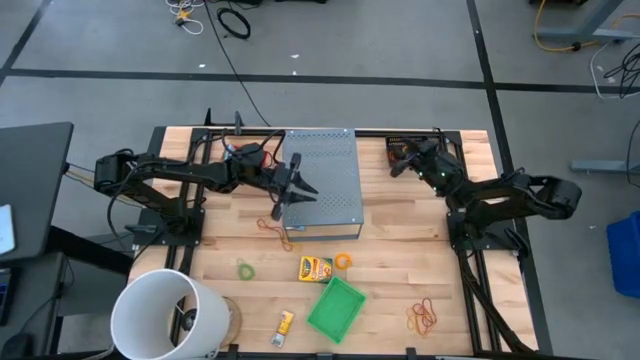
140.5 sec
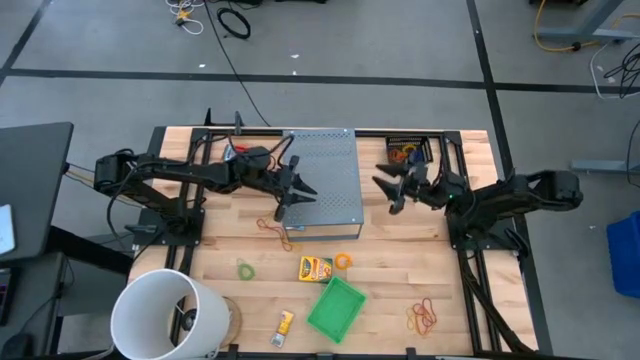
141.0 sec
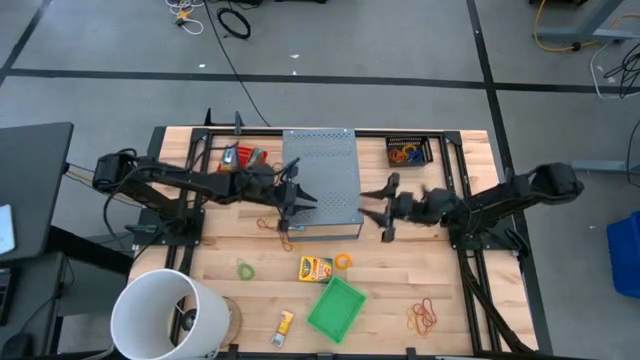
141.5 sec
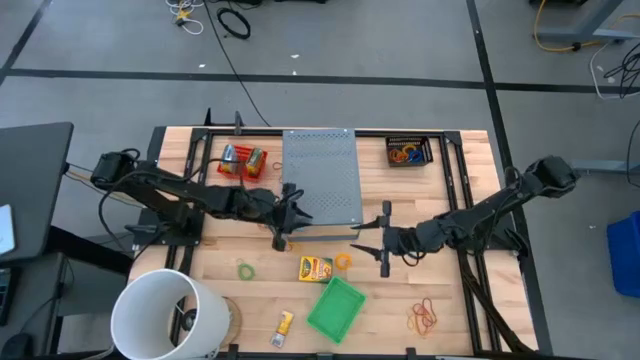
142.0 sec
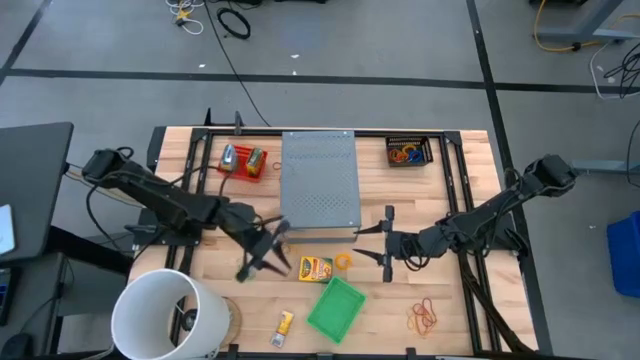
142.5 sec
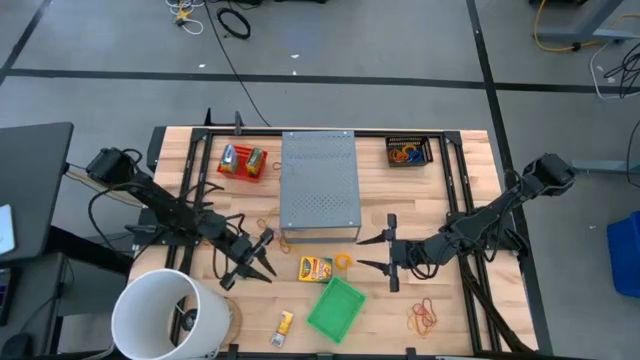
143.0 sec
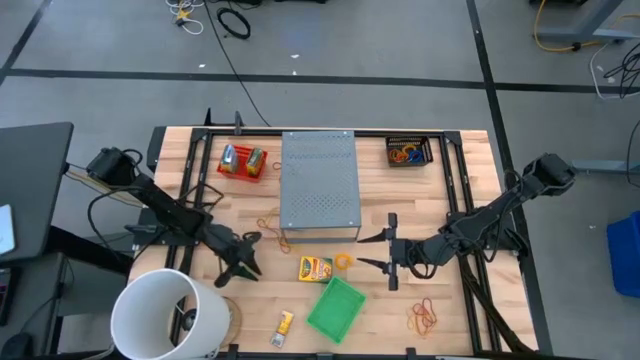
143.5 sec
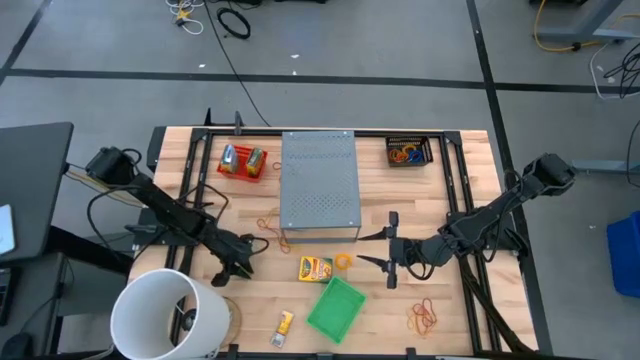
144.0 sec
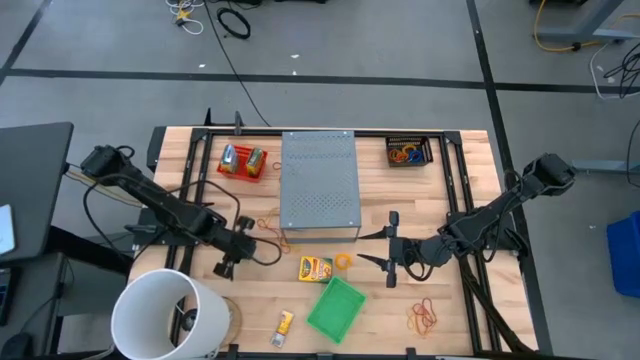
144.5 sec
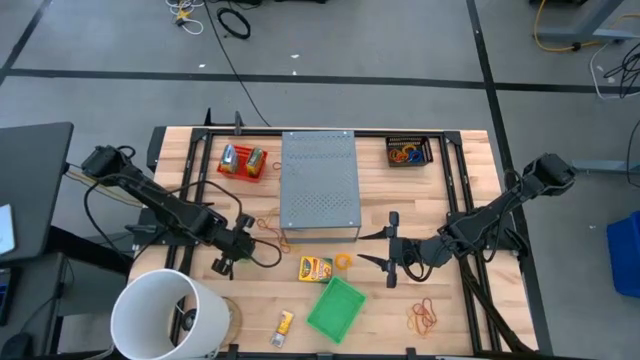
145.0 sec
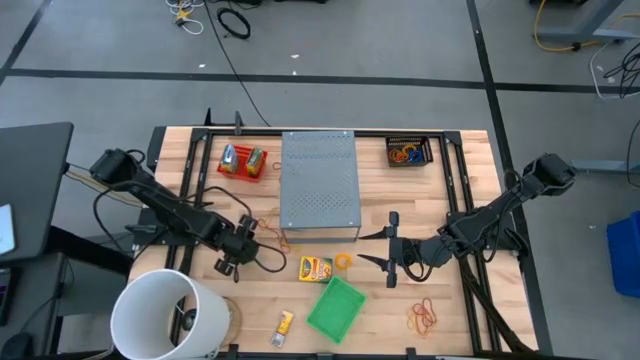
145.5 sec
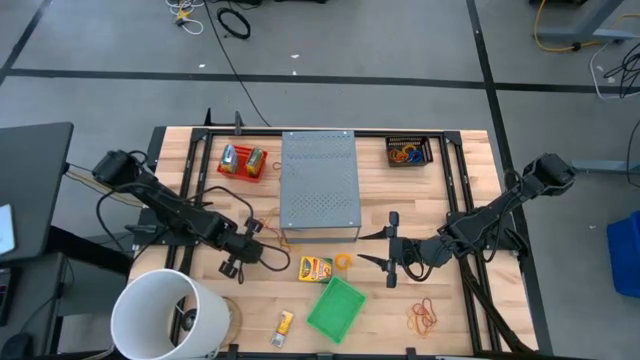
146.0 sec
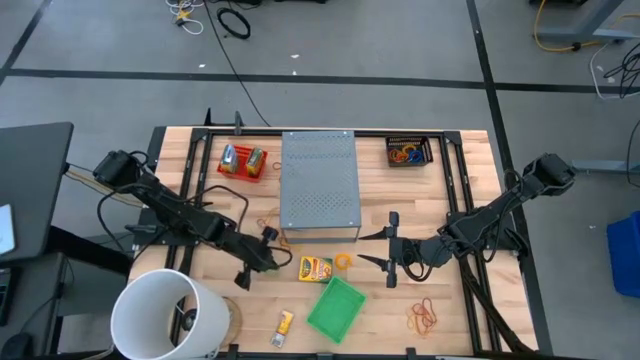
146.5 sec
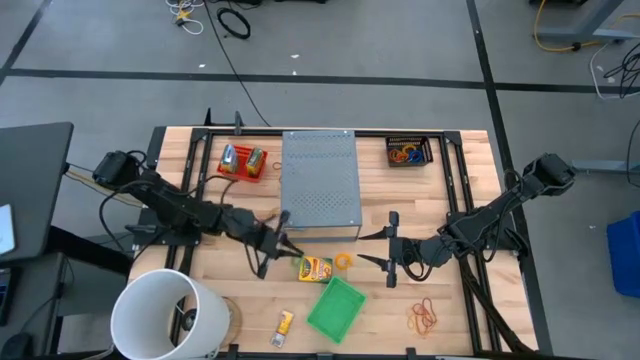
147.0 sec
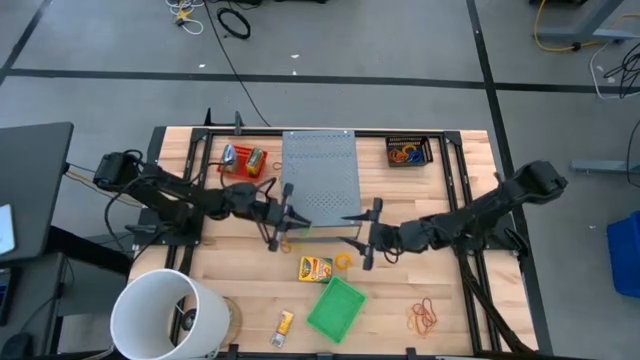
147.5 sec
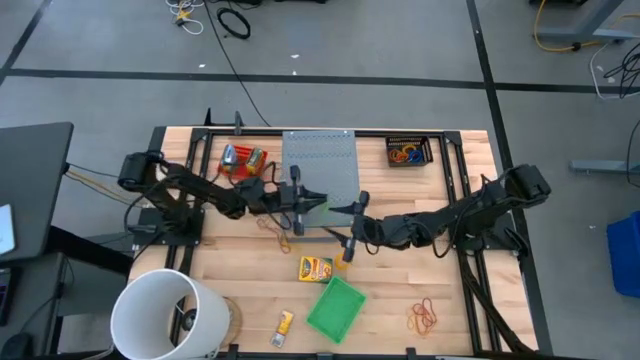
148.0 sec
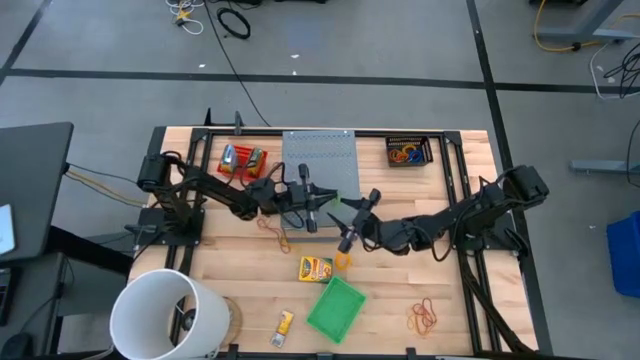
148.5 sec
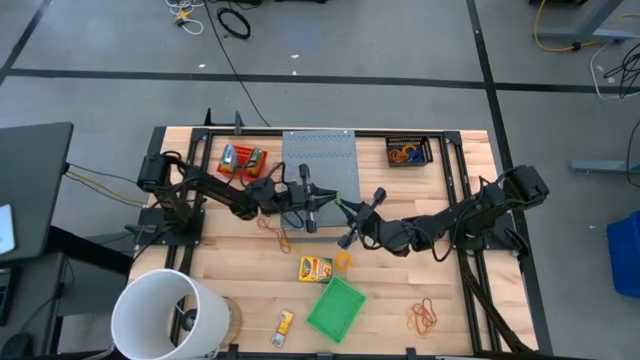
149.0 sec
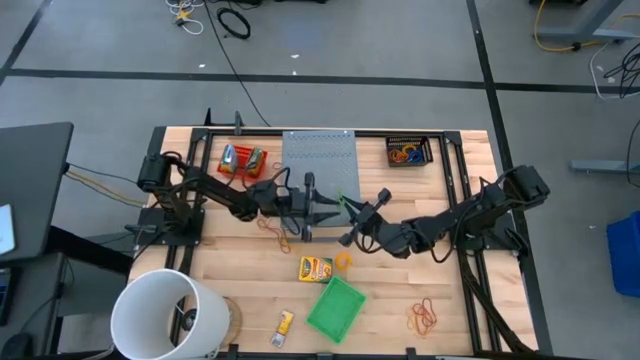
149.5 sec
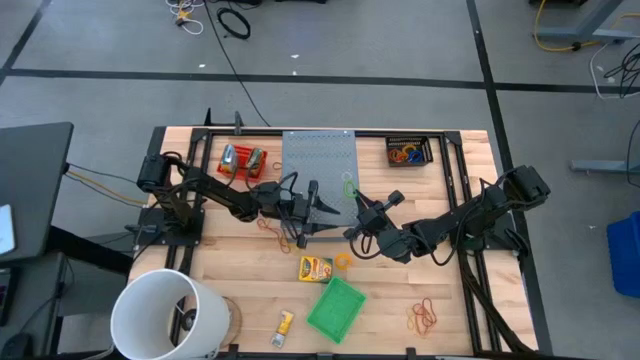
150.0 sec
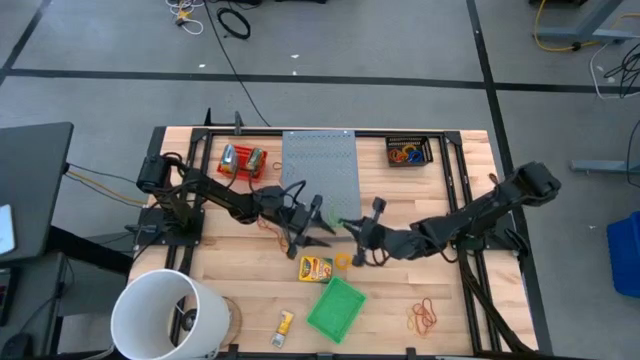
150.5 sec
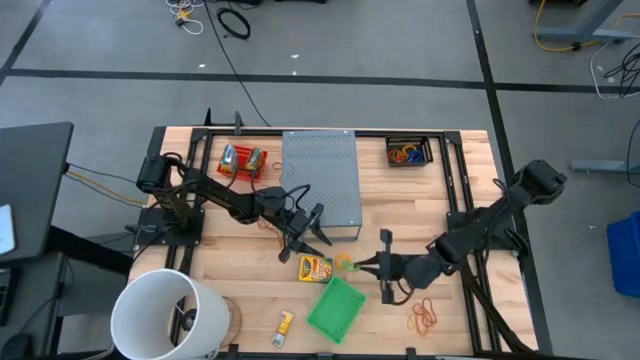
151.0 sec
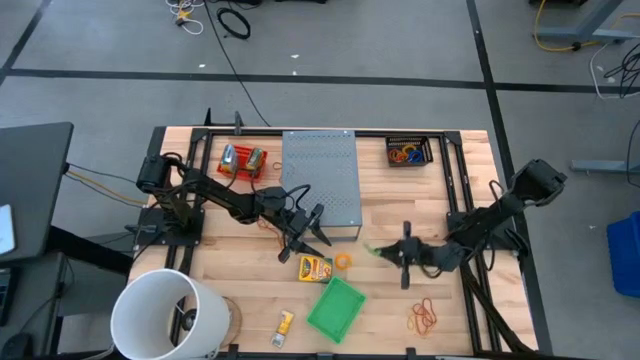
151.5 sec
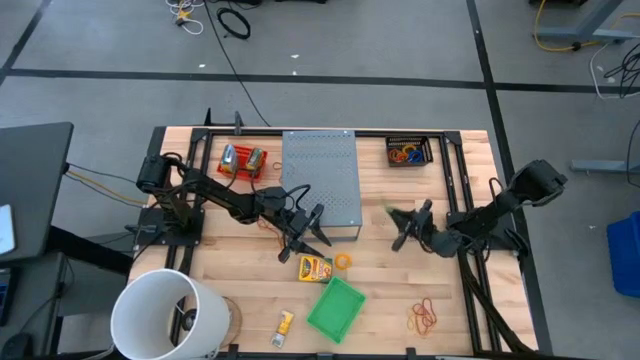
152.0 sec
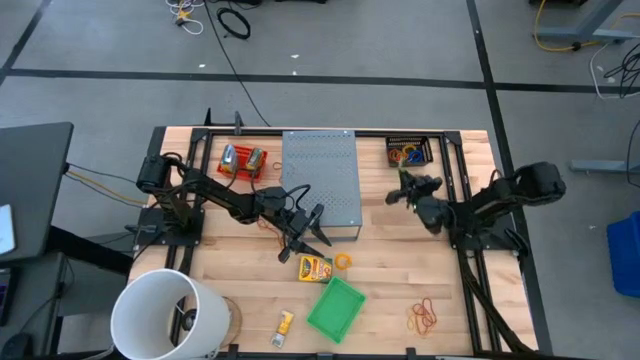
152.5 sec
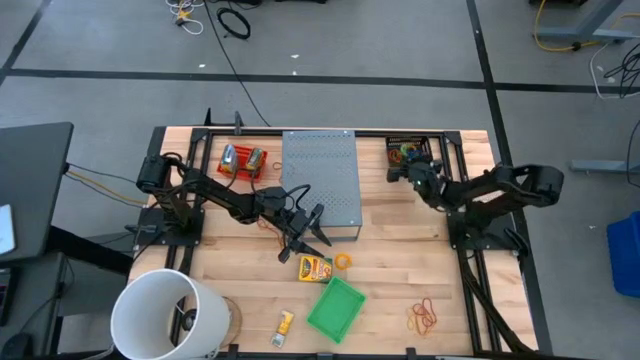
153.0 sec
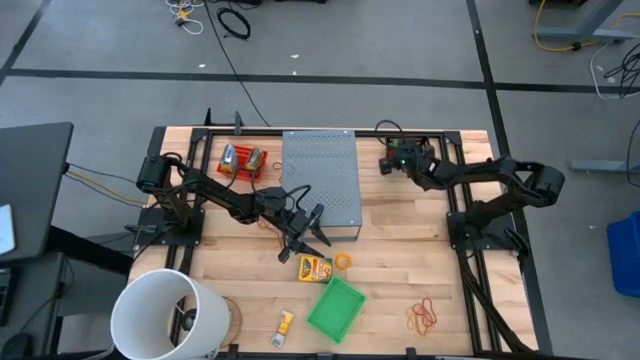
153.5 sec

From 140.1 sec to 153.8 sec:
Task: Pick & Place Office Desk Supplies
Put the green spring keychain into the black basket

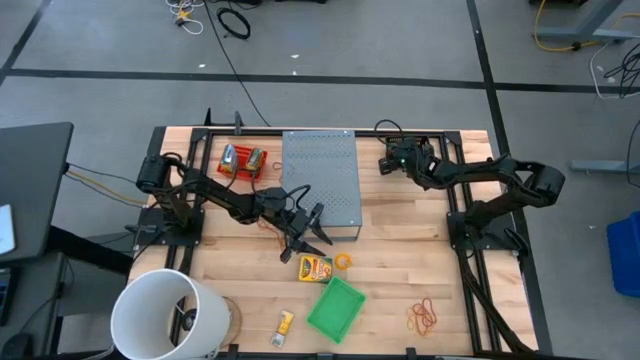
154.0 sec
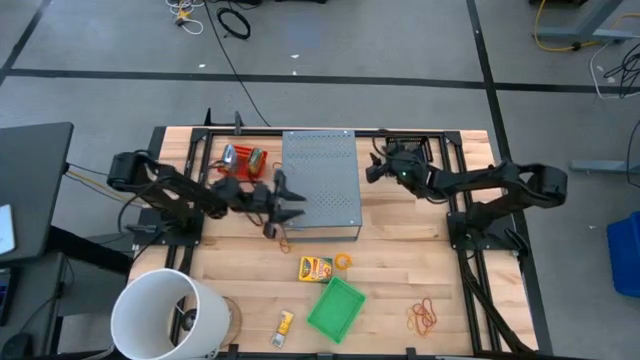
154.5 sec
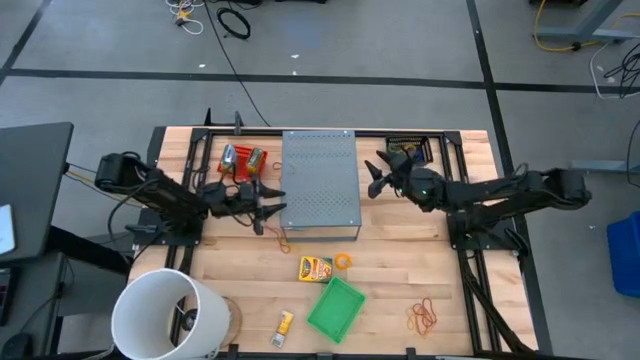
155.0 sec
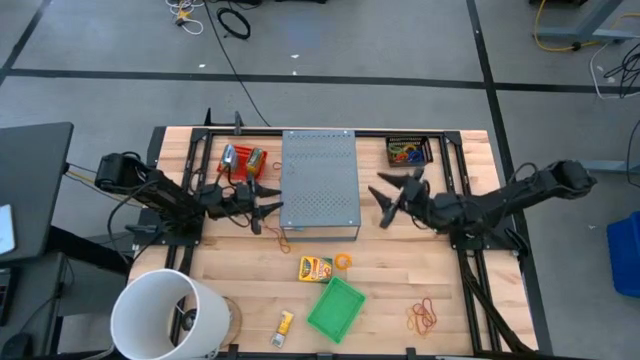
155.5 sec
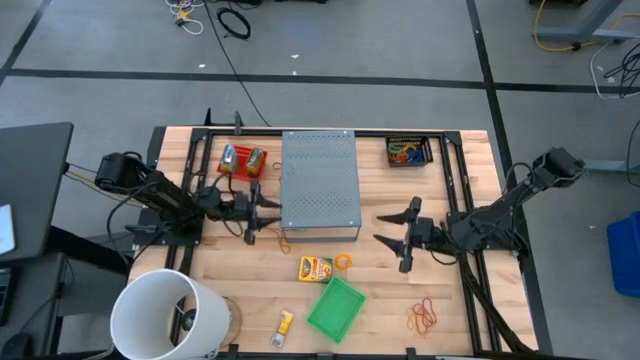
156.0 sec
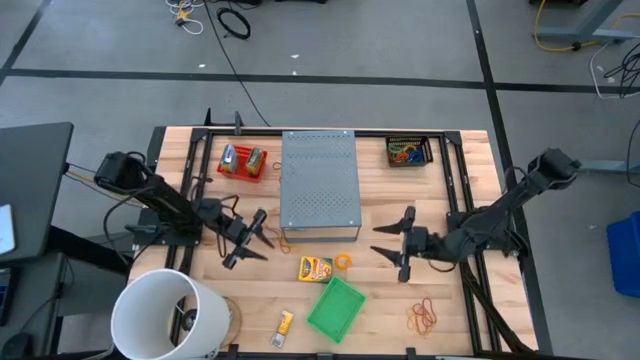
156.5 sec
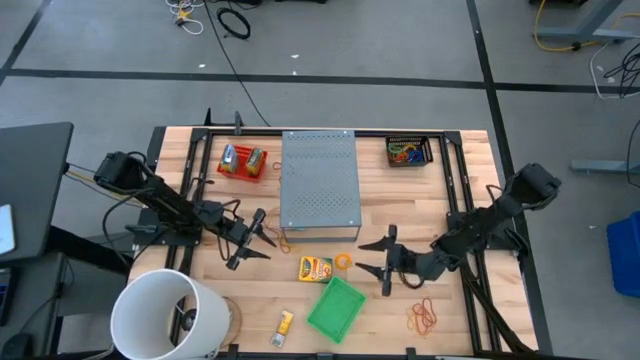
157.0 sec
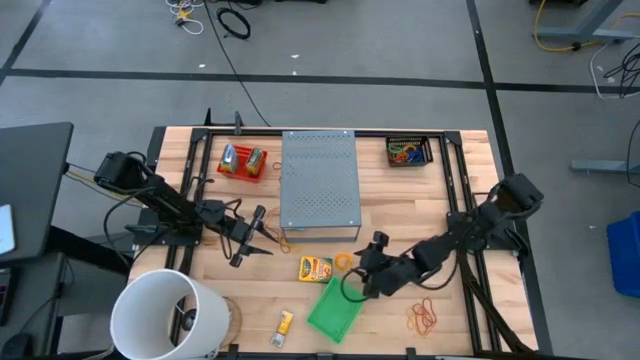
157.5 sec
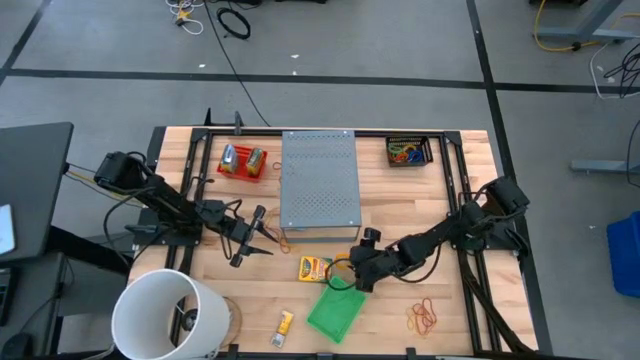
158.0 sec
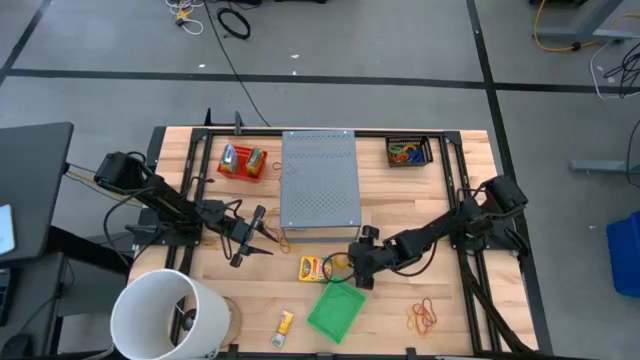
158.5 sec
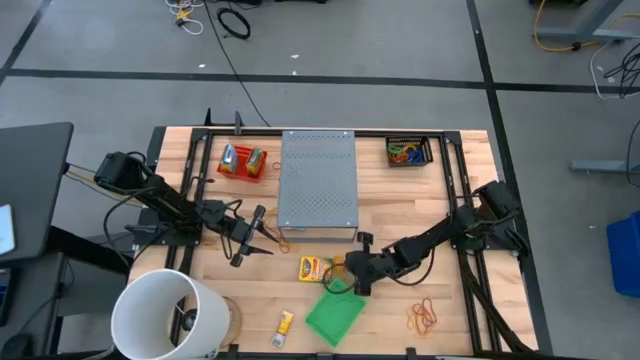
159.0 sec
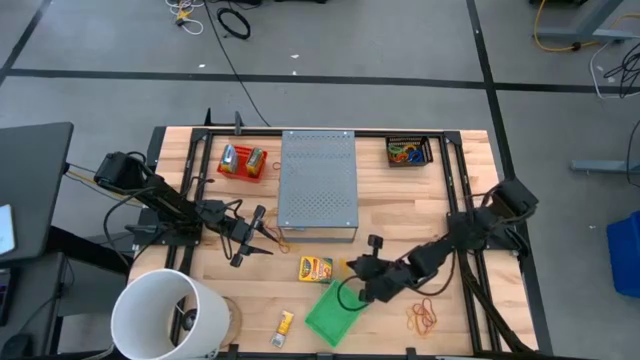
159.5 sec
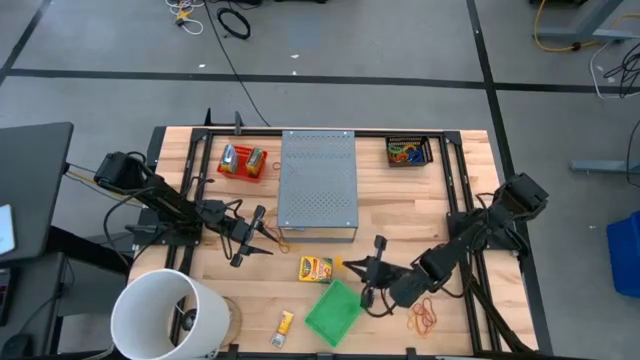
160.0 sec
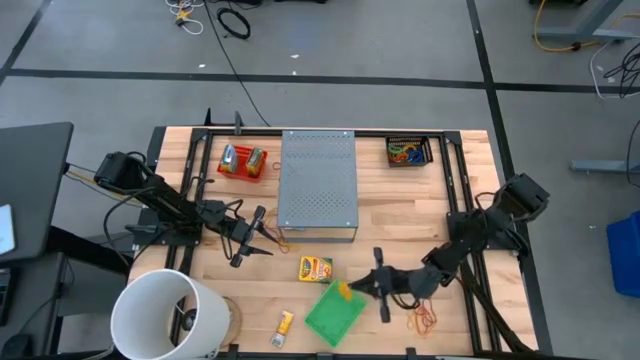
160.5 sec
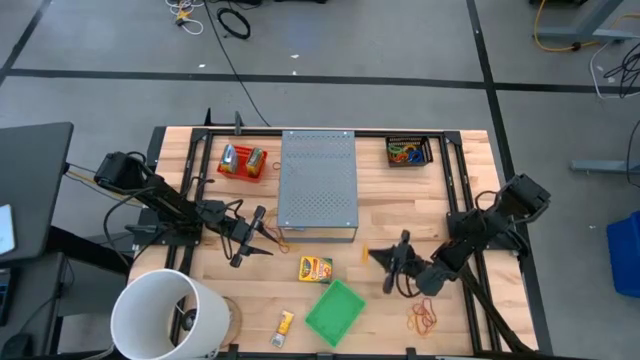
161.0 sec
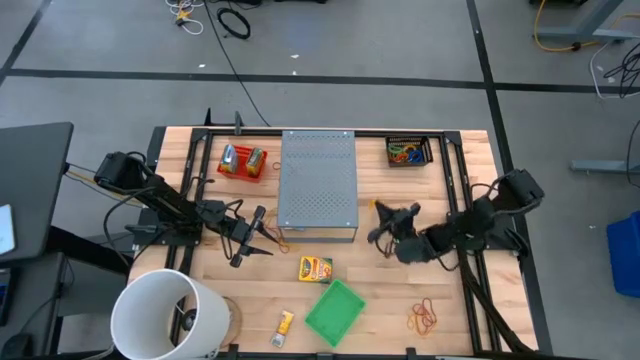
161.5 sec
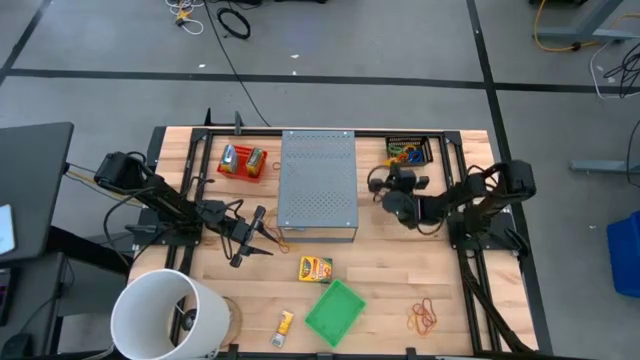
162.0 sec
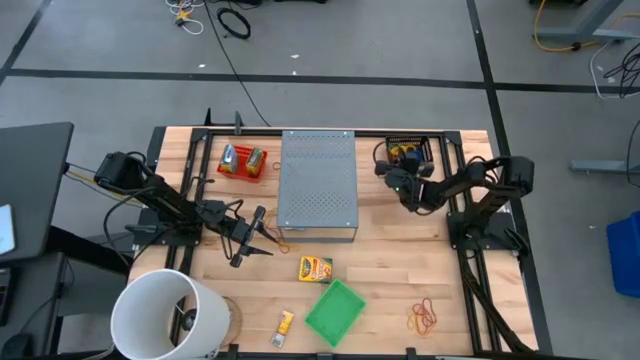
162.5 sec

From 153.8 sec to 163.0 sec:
Put the yellow spring keychain into the black basket
